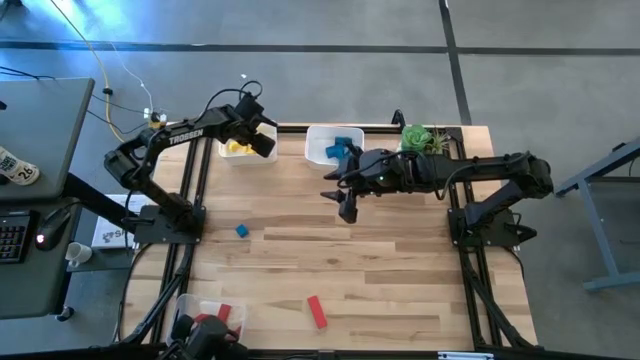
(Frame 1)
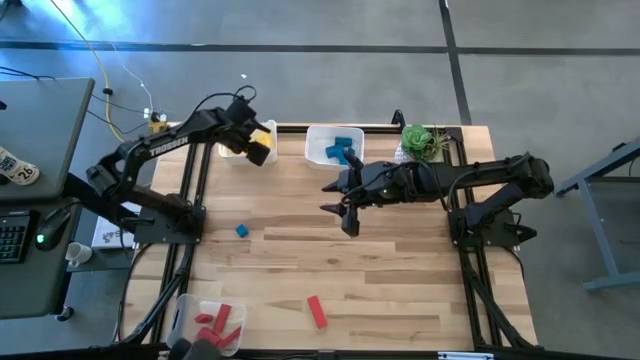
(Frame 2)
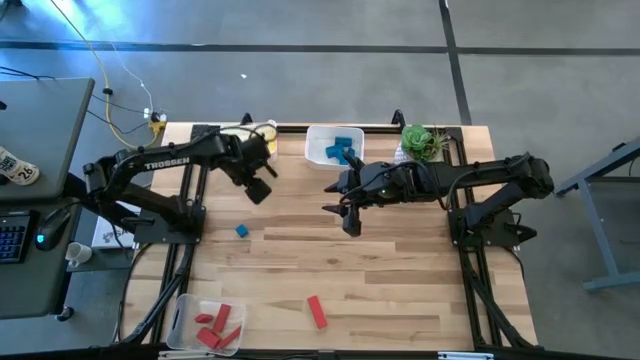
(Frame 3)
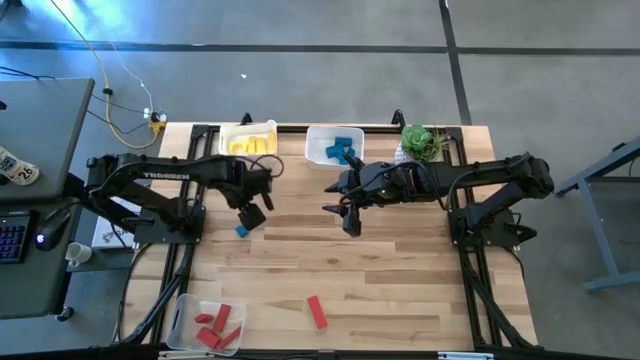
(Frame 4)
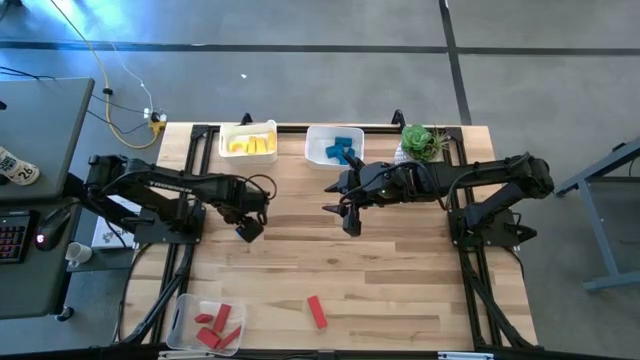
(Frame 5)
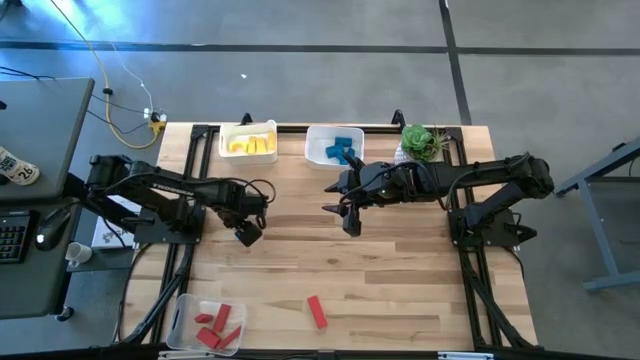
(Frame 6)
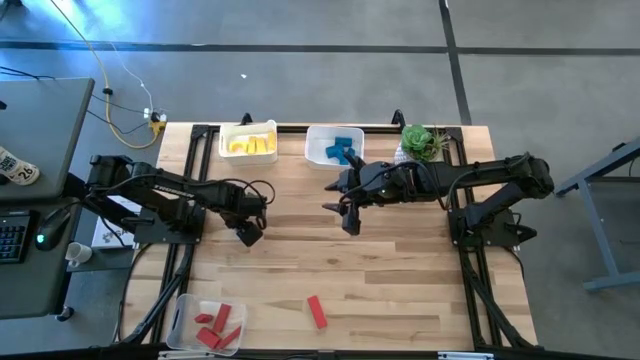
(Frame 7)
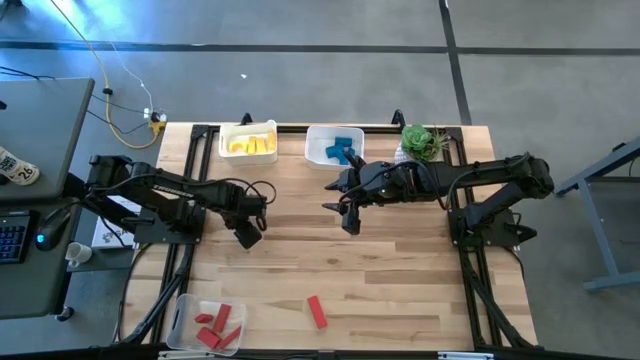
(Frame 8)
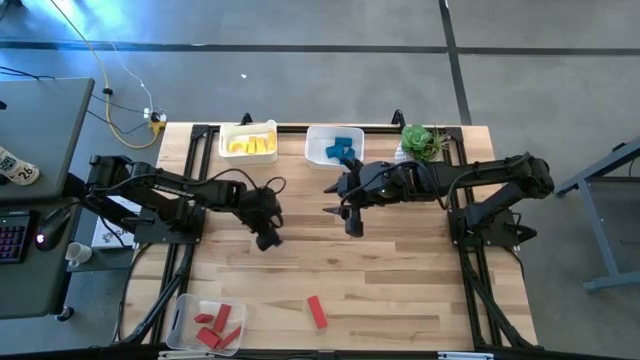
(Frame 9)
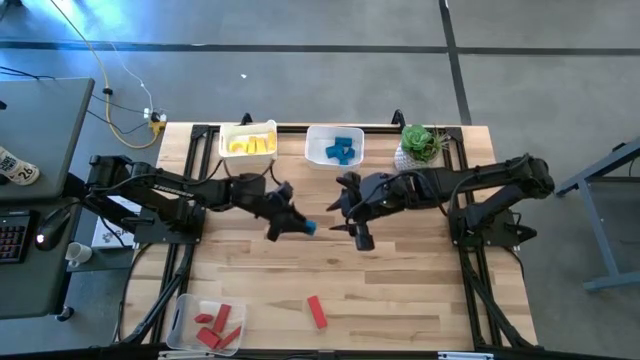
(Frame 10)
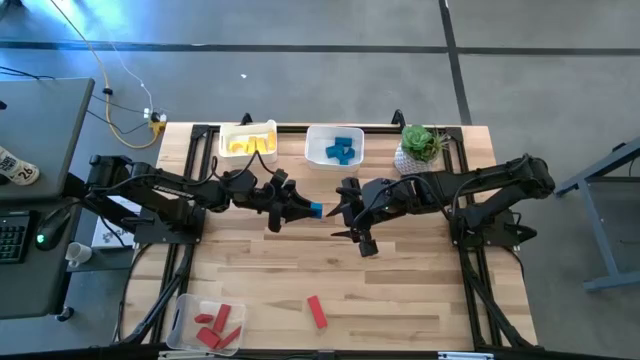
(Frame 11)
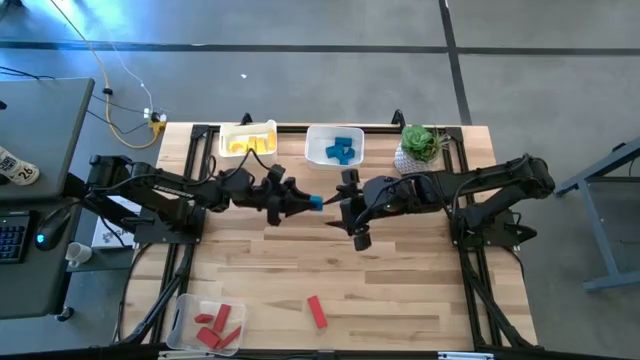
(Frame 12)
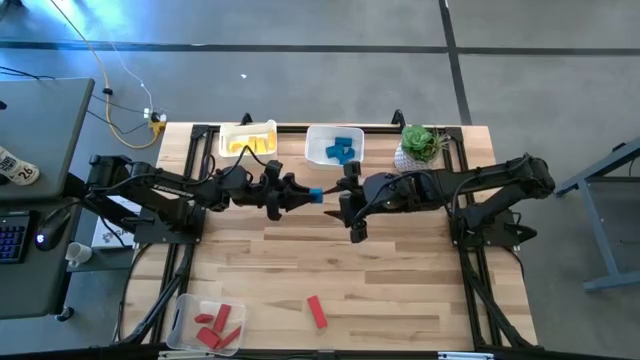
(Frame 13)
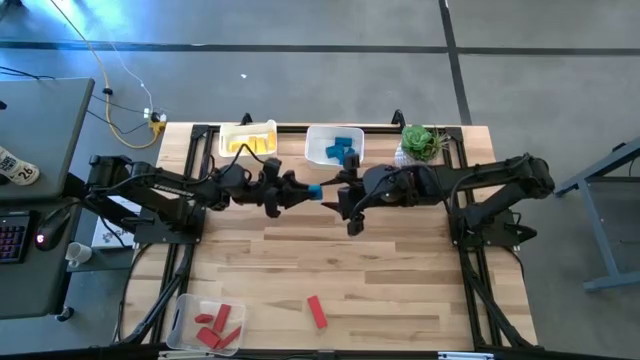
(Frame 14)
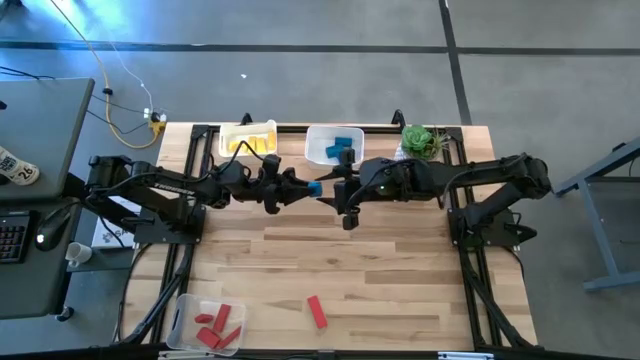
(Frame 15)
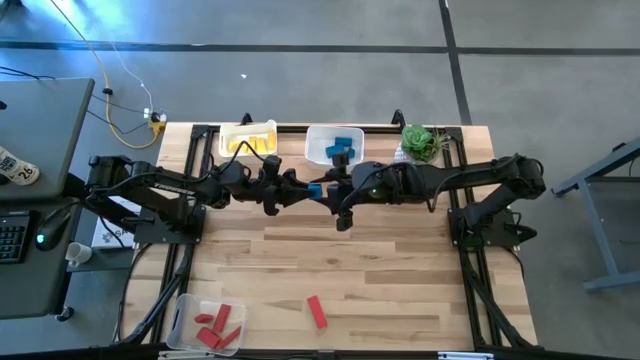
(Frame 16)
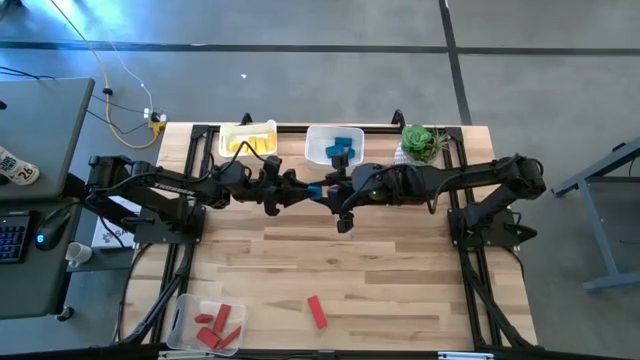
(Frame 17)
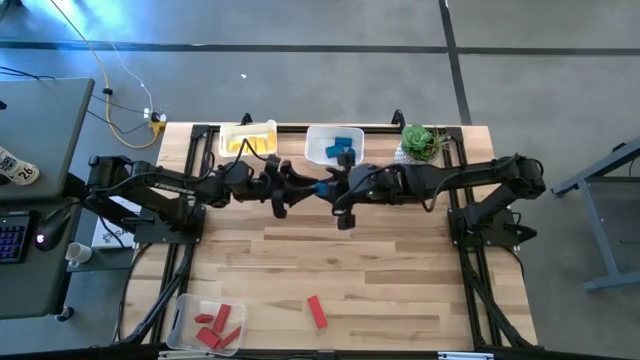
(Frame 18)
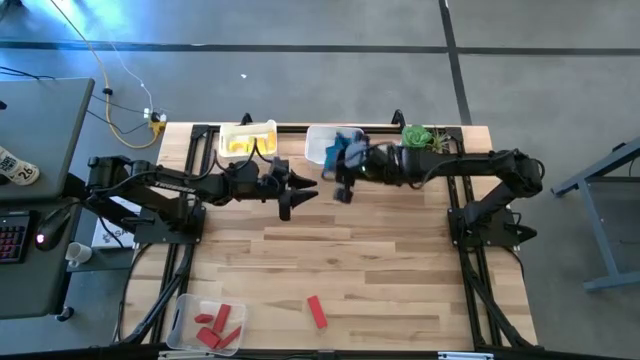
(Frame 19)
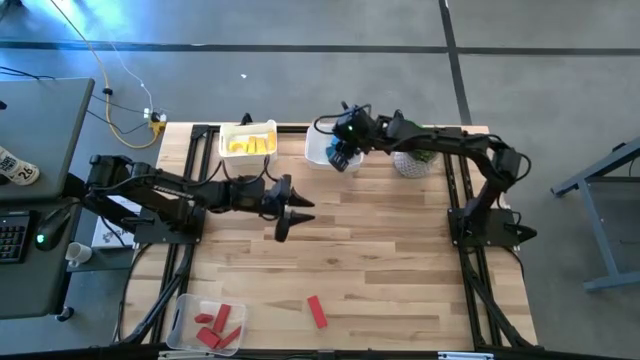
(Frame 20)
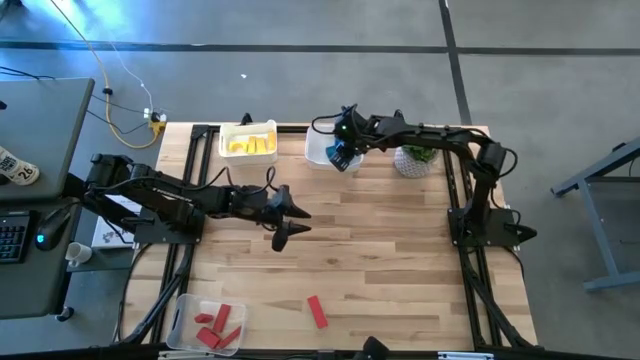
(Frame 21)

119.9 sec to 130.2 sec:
Task: Sort & place blocks by color
Put the blue block into the right white bin

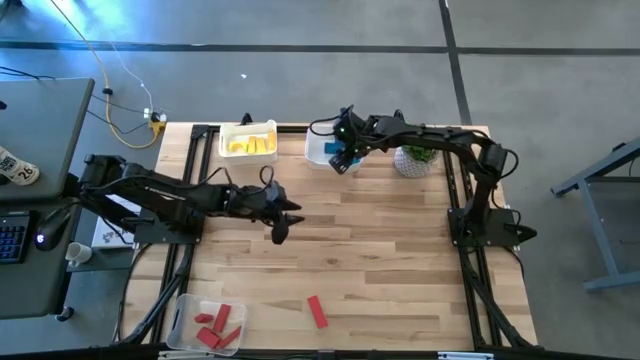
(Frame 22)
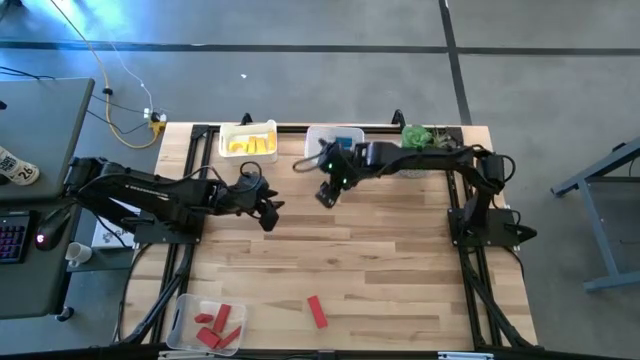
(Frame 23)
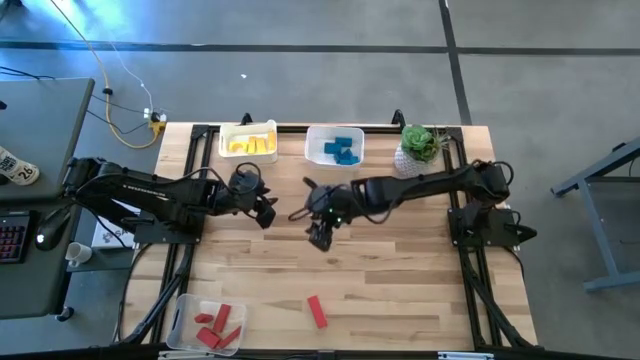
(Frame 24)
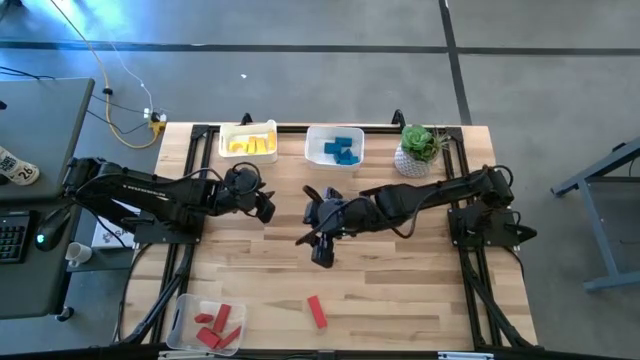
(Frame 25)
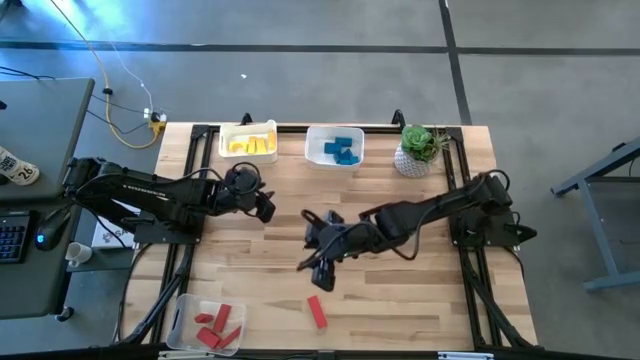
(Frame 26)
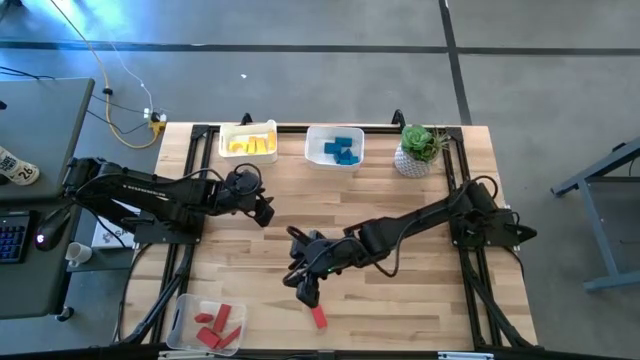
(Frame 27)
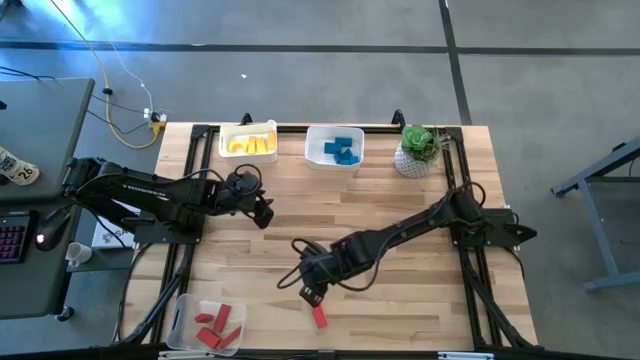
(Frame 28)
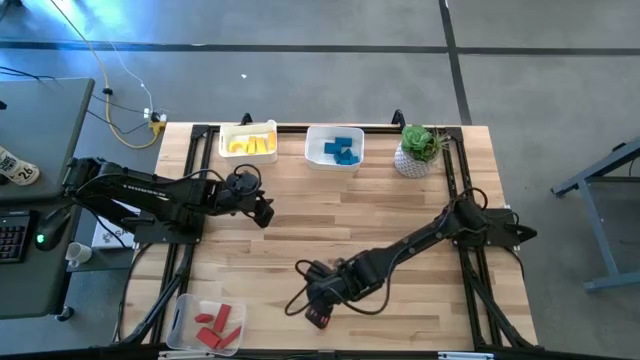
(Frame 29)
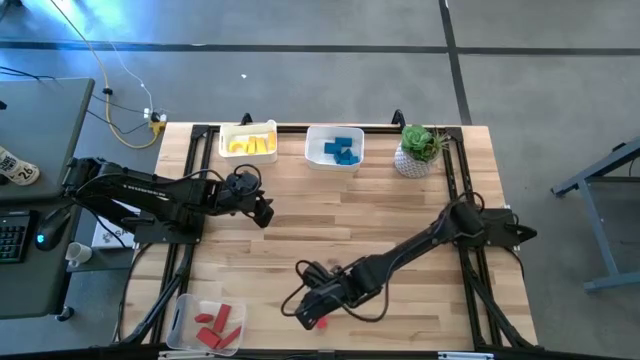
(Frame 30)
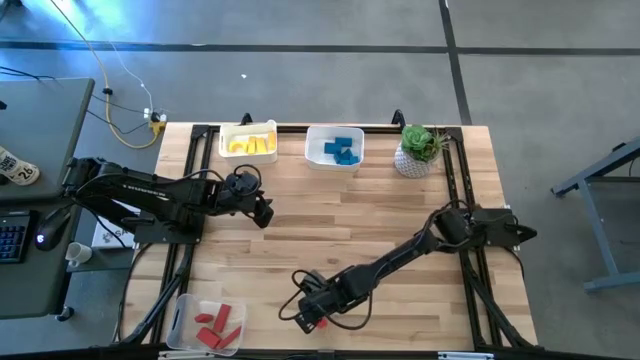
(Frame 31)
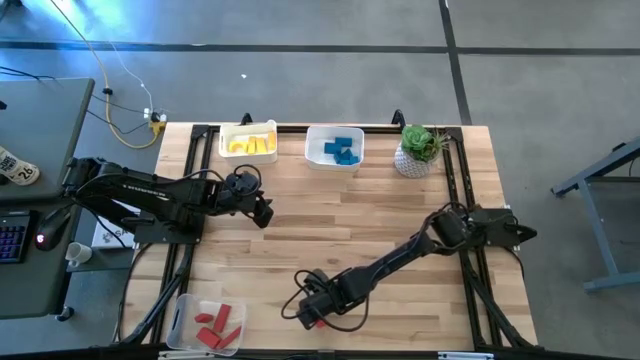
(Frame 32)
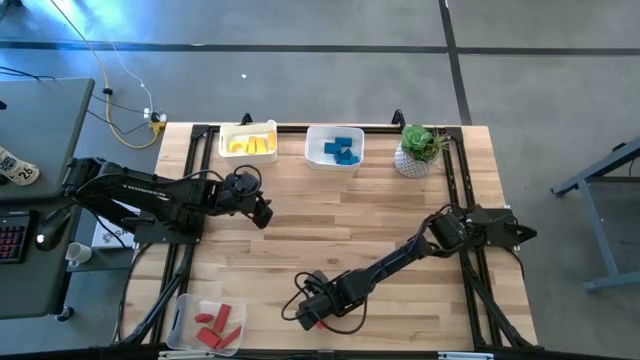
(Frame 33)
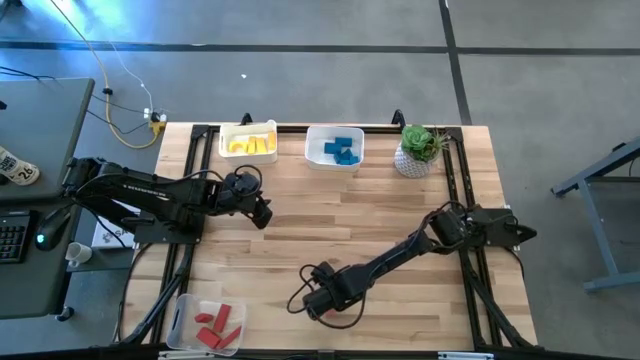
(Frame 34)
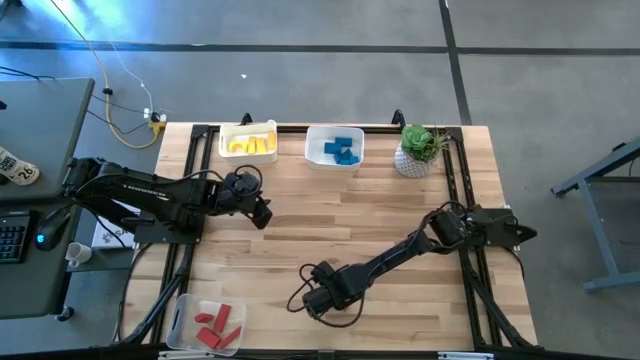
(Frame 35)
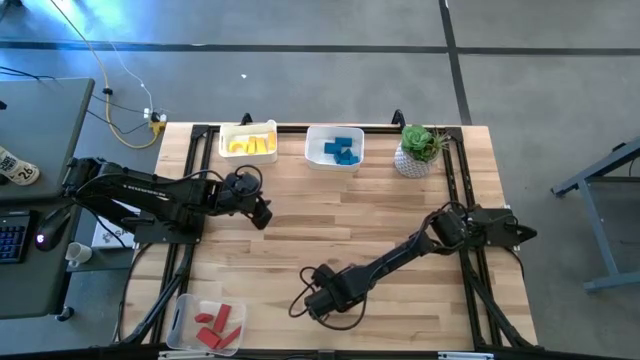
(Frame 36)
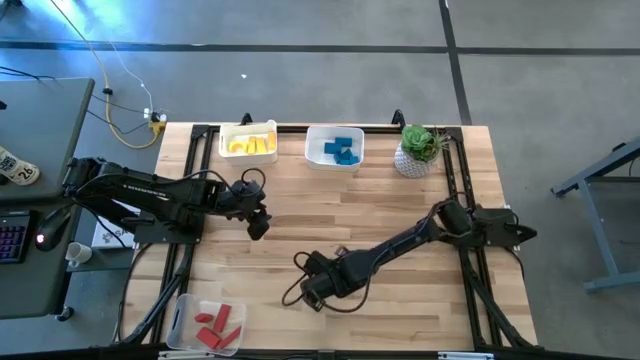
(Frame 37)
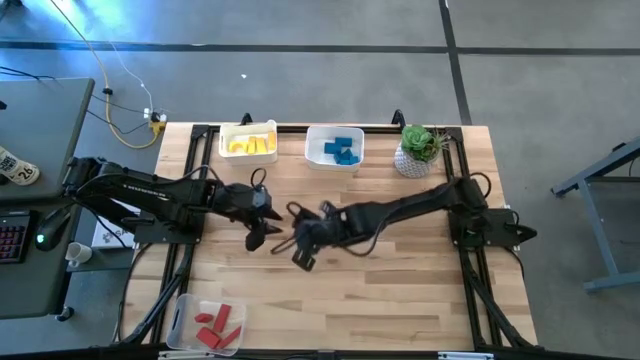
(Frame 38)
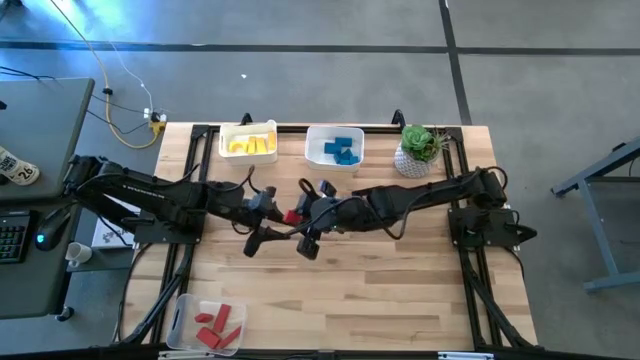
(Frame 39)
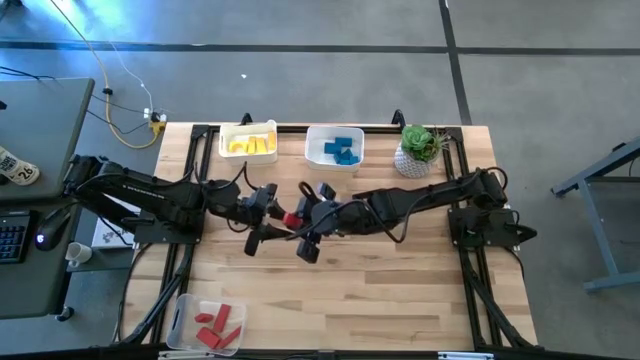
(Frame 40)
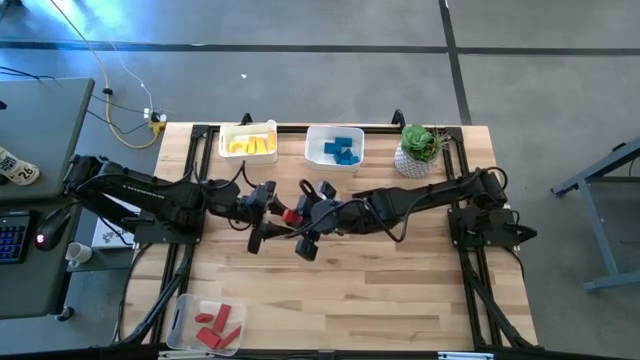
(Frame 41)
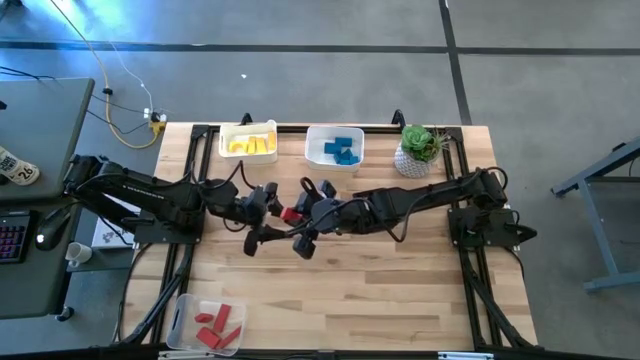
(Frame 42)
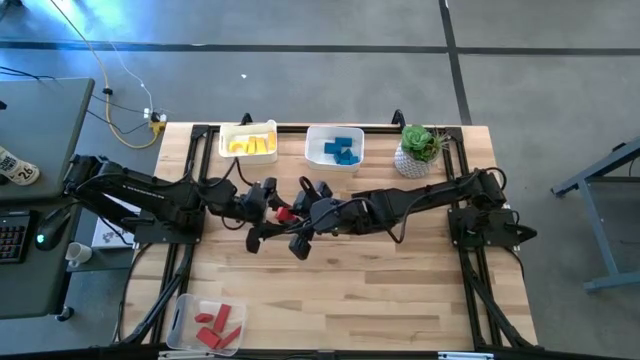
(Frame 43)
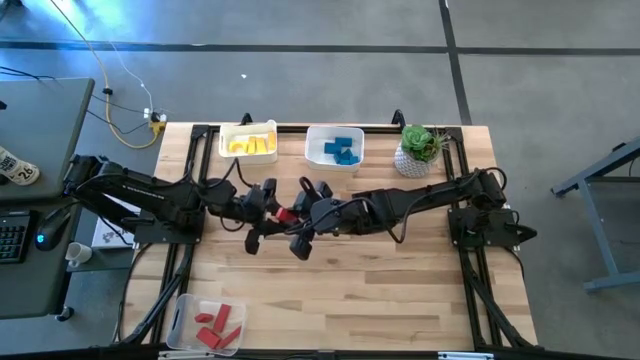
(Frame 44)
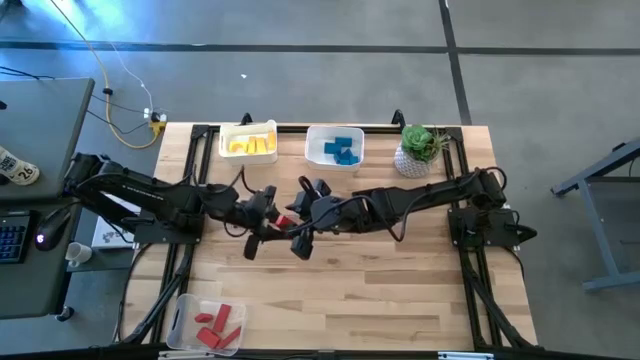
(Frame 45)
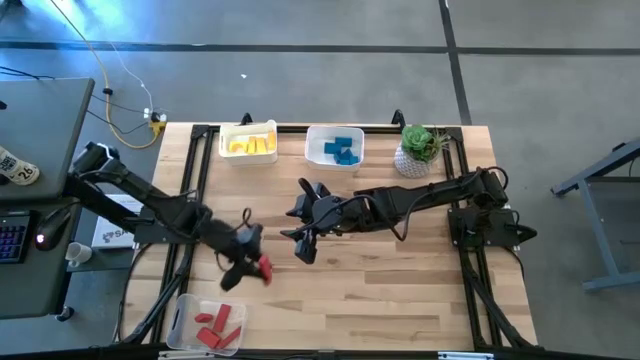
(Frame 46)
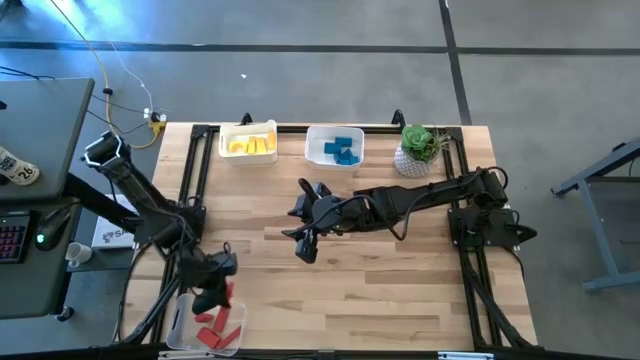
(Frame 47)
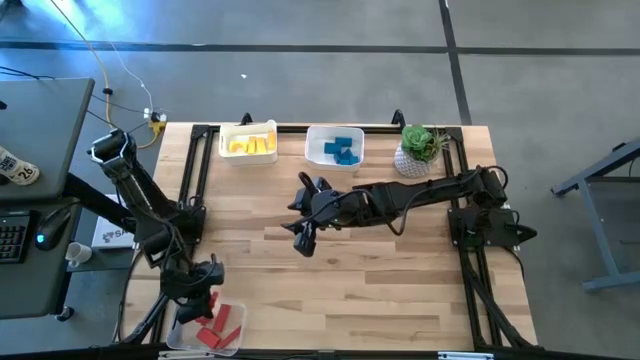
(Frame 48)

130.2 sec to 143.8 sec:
Put the red block into the transparent bin
